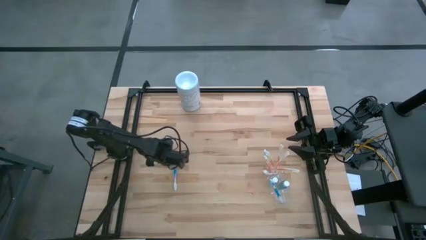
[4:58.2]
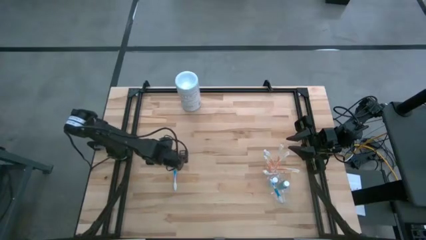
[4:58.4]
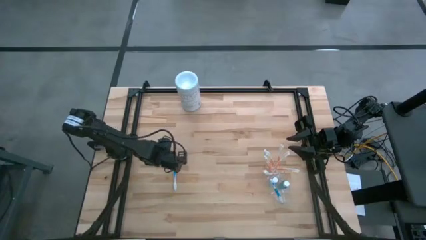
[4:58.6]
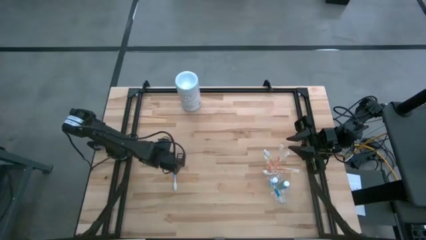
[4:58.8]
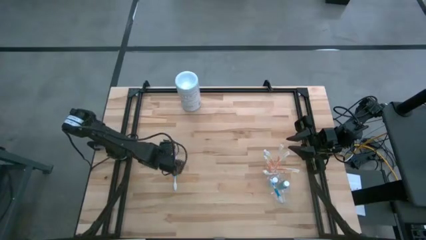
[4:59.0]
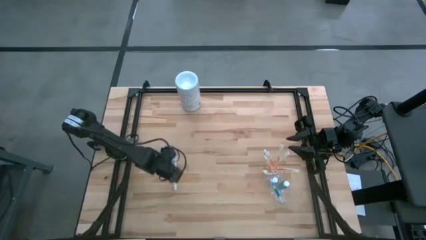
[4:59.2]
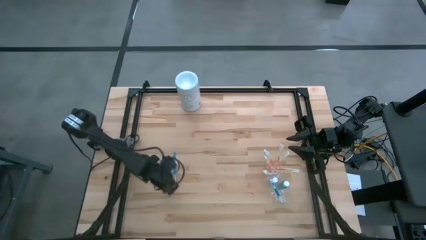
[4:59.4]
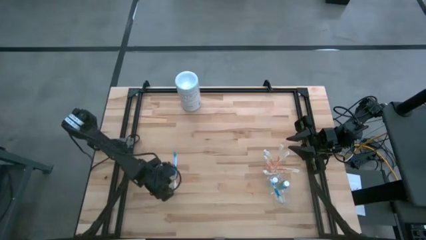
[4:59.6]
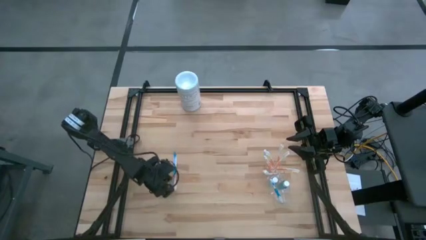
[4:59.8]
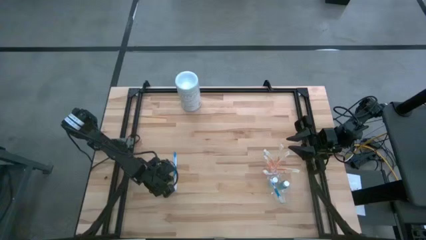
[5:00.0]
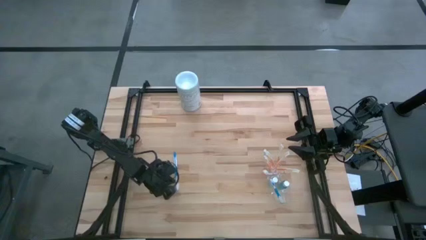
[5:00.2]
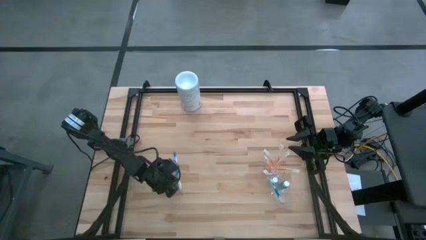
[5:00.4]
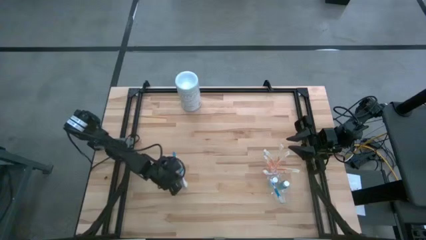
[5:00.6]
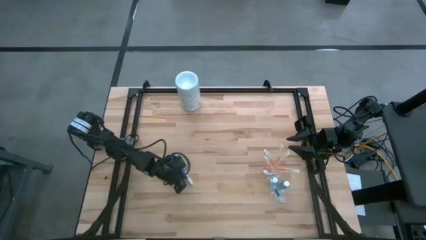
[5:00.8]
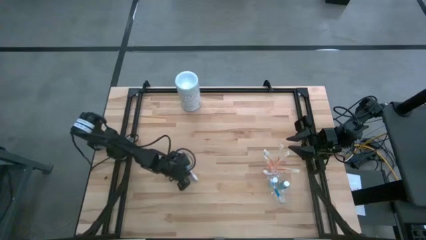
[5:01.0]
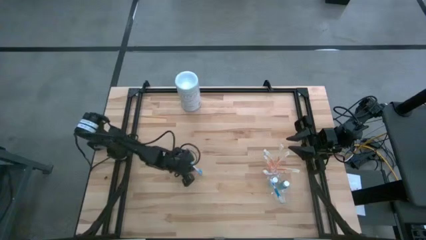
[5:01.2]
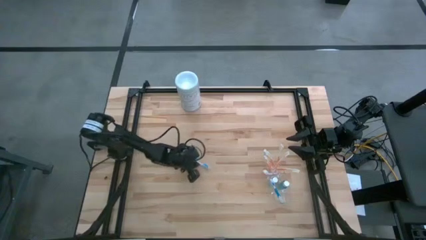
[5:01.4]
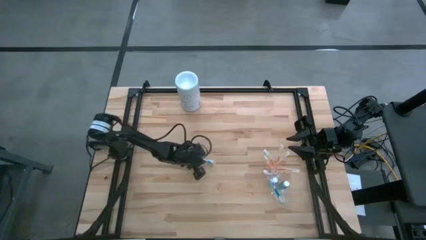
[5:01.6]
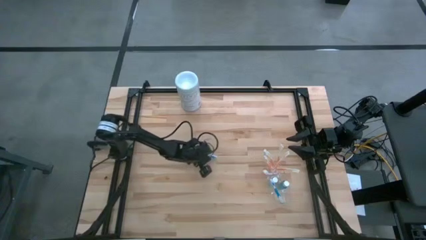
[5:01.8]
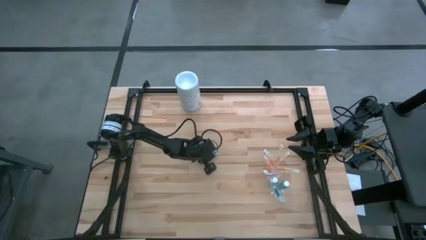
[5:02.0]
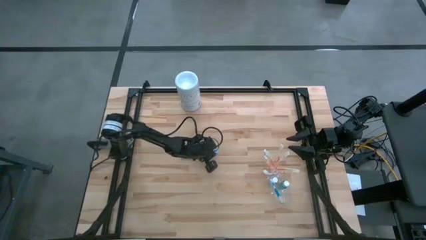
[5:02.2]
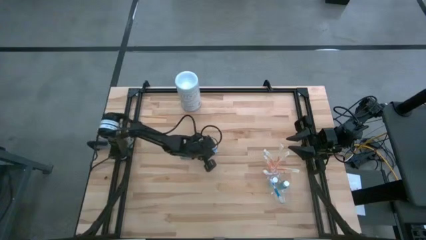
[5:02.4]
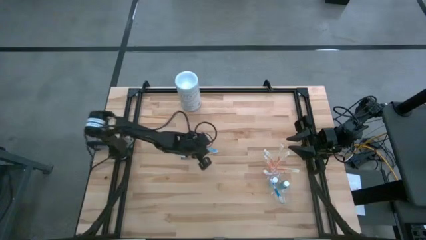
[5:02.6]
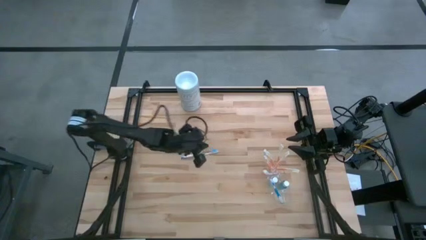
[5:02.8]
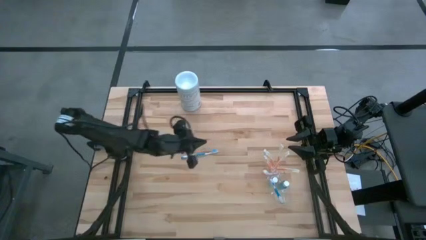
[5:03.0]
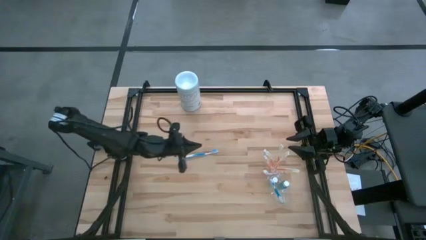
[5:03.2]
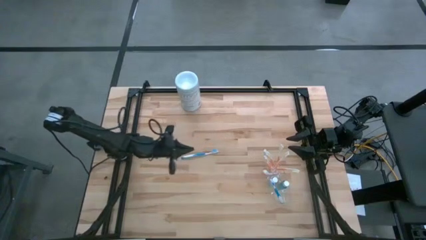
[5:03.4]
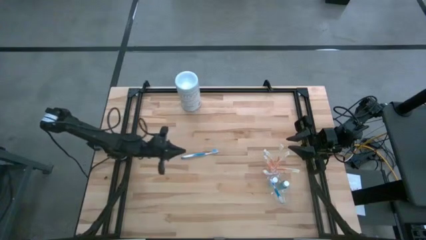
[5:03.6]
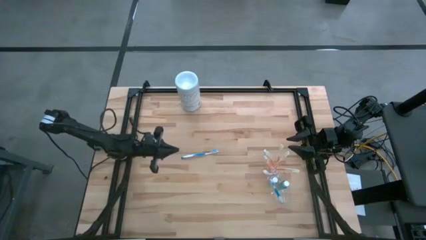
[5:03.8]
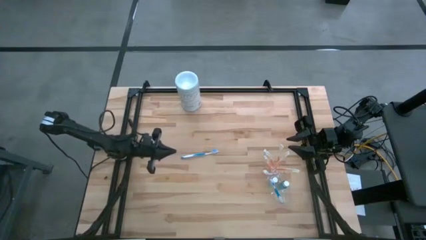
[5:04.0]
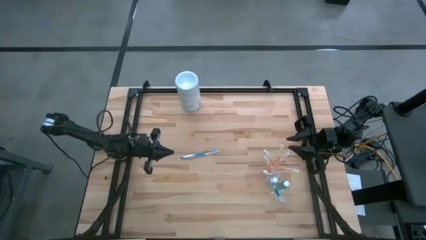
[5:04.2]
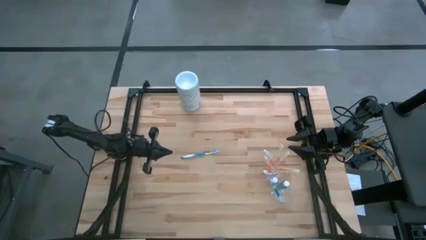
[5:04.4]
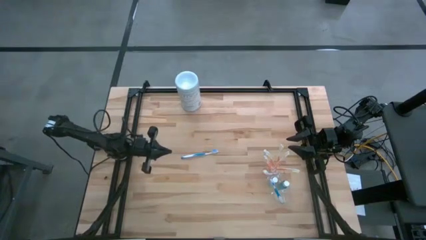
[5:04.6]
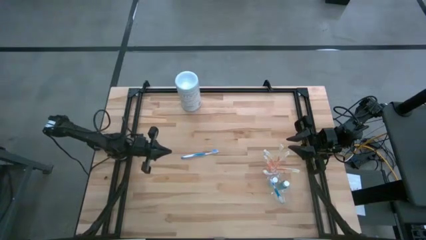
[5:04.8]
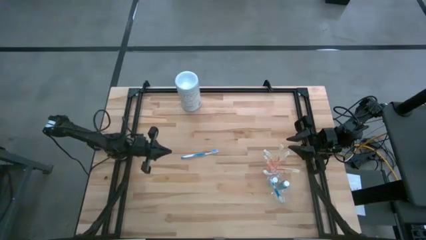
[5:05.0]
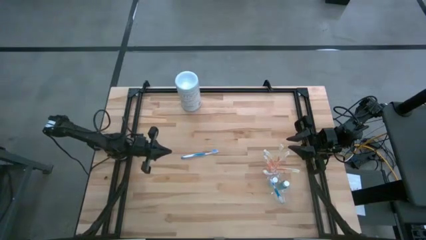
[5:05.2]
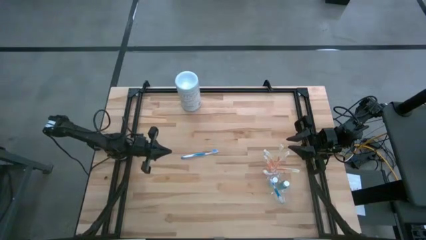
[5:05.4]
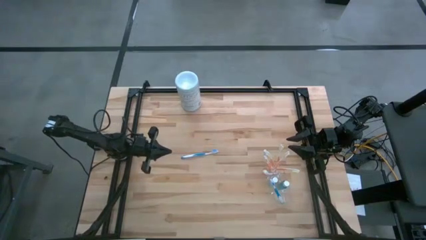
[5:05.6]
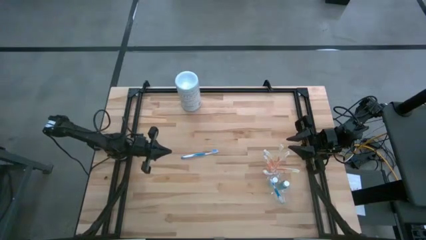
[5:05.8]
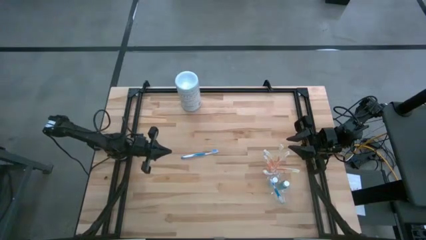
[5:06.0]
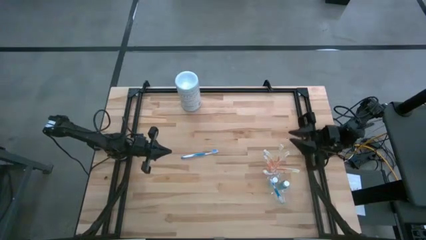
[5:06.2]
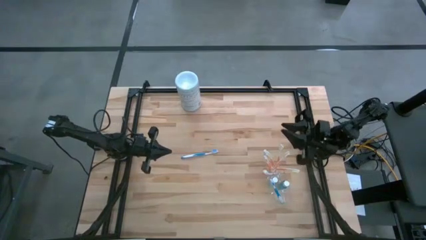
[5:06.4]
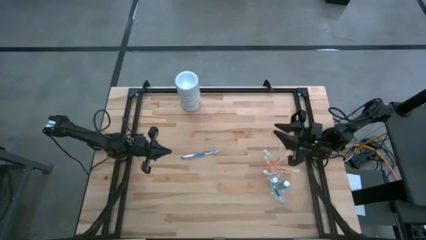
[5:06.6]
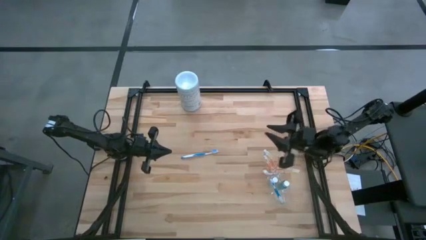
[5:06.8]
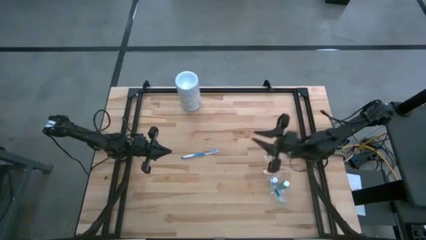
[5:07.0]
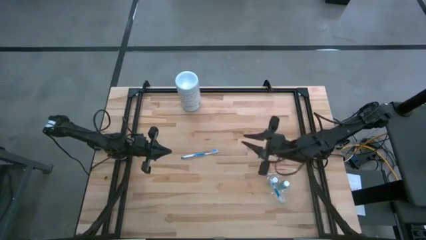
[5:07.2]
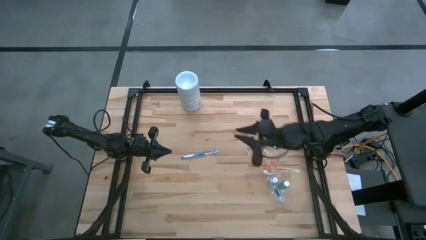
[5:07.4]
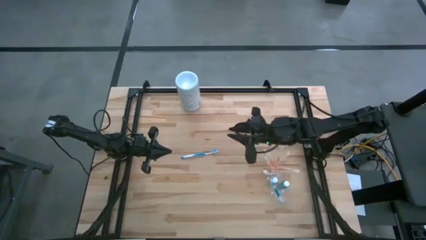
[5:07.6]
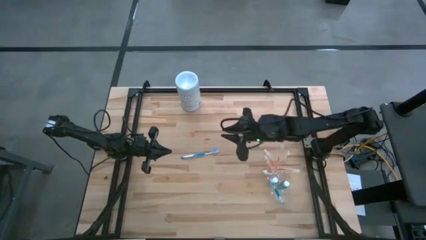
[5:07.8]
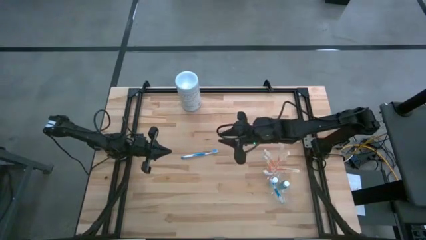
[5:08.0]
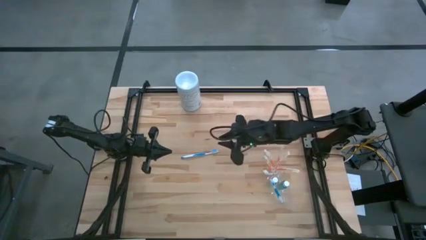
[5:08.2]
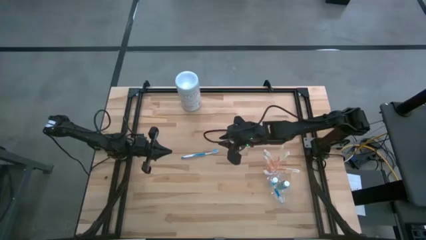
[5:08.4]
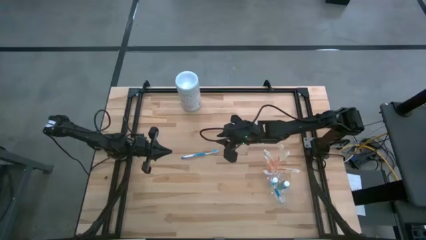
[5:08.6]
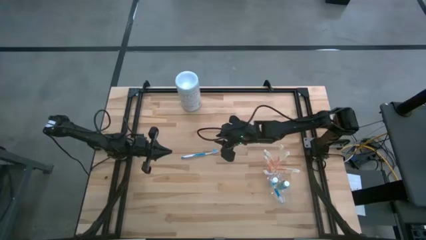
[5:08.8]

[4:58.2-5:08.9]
Task: Pick & Place toothbrushing station
Put the blue toothbrush into the bottom section of the transparent organizer

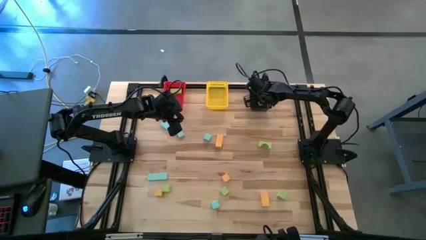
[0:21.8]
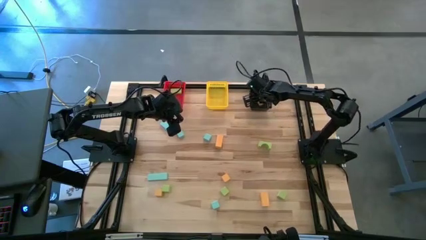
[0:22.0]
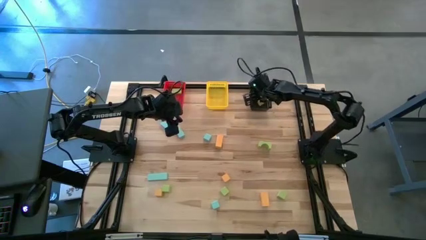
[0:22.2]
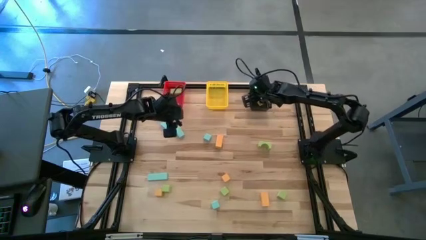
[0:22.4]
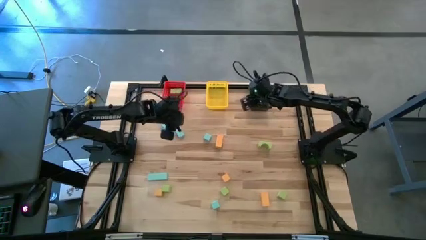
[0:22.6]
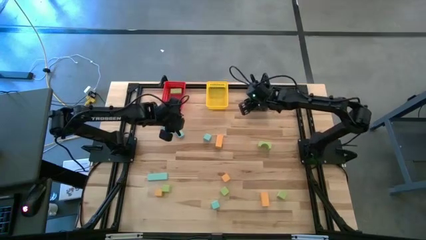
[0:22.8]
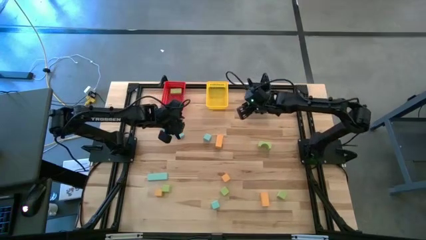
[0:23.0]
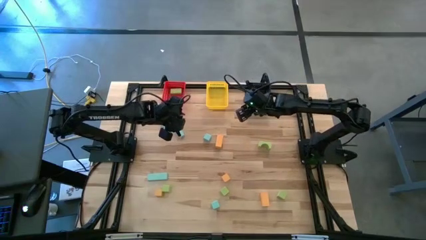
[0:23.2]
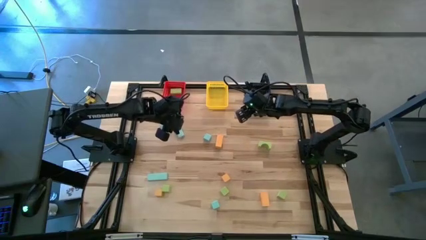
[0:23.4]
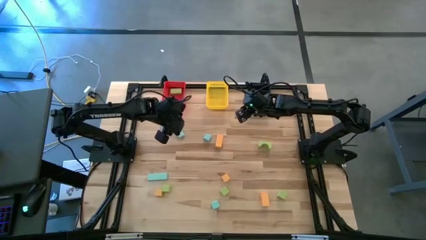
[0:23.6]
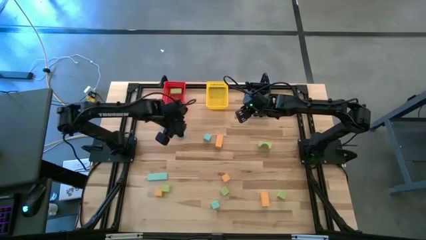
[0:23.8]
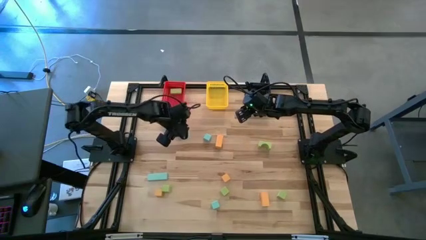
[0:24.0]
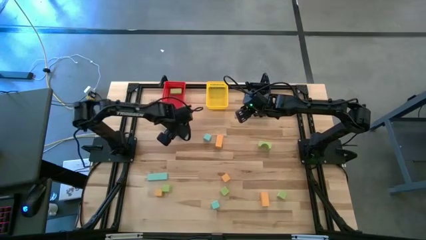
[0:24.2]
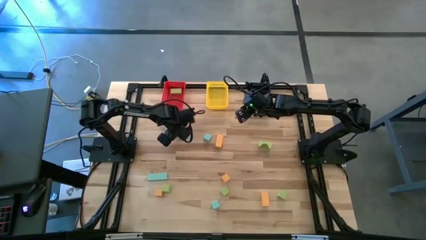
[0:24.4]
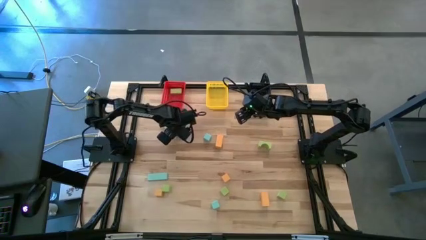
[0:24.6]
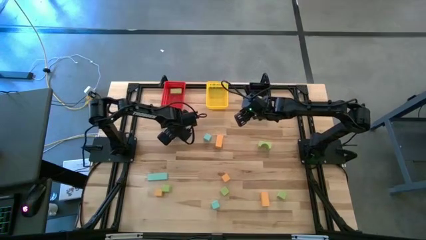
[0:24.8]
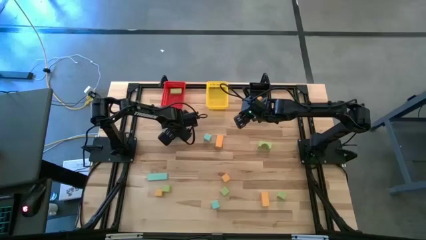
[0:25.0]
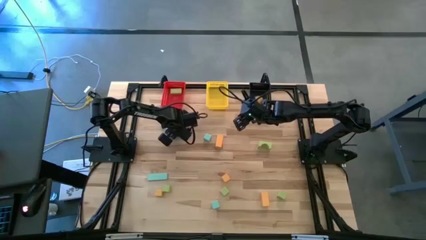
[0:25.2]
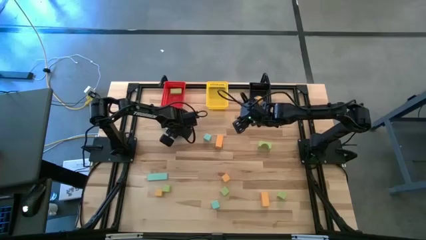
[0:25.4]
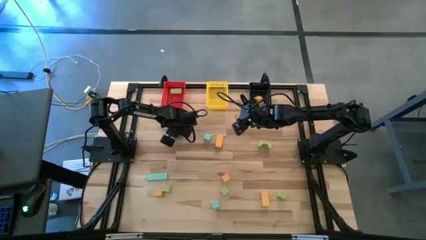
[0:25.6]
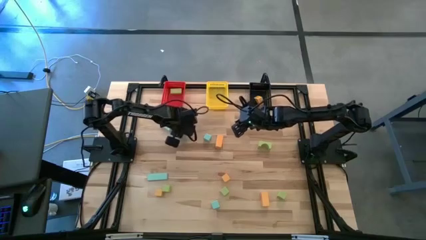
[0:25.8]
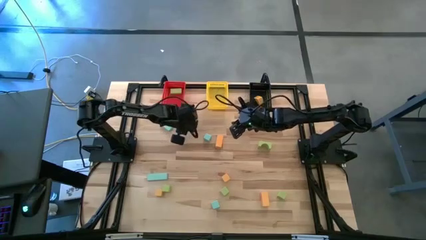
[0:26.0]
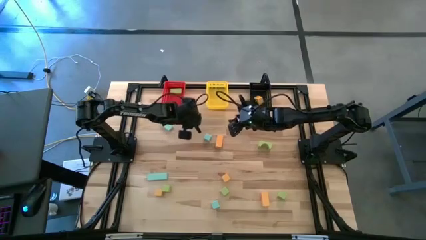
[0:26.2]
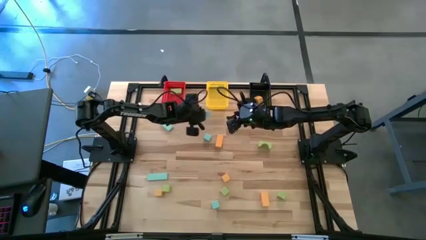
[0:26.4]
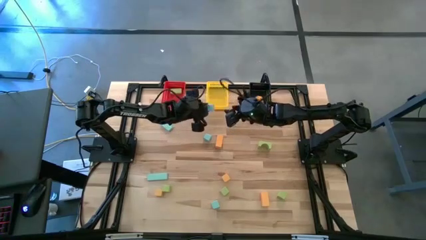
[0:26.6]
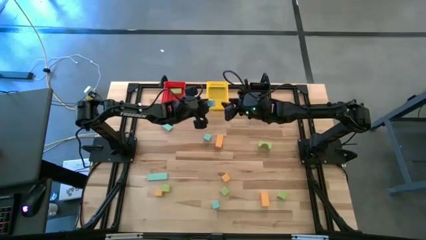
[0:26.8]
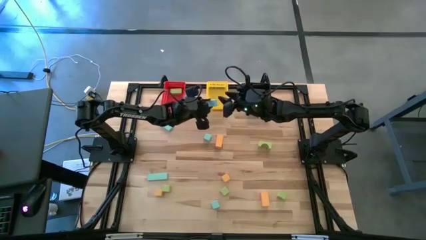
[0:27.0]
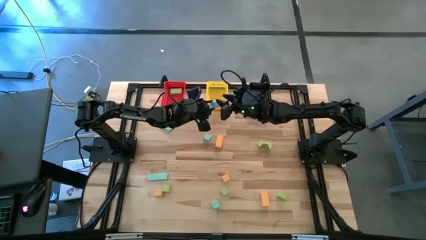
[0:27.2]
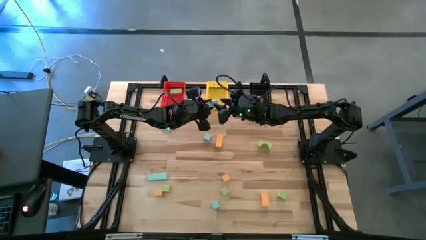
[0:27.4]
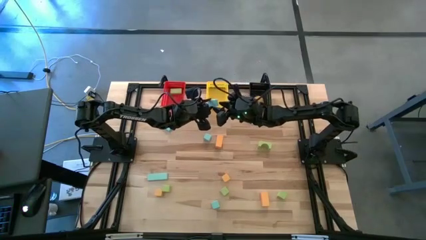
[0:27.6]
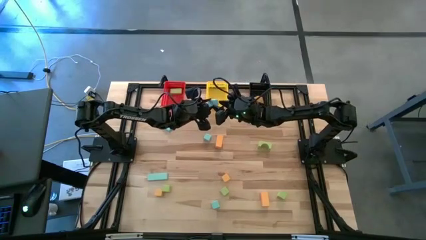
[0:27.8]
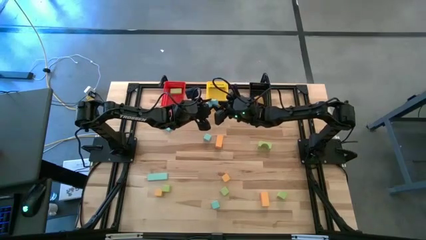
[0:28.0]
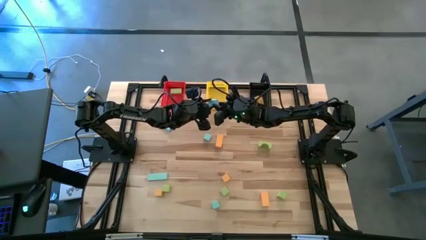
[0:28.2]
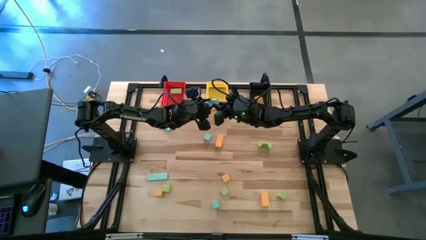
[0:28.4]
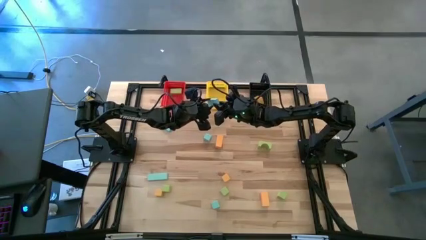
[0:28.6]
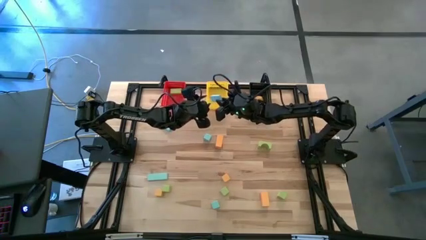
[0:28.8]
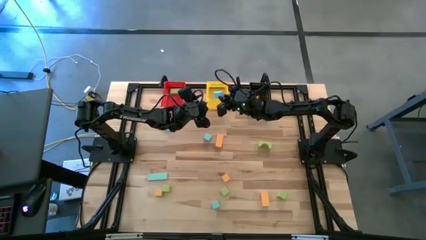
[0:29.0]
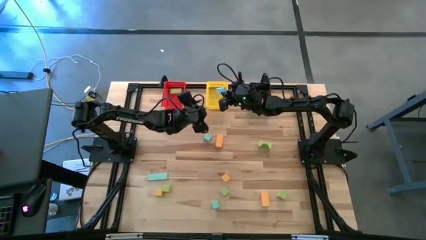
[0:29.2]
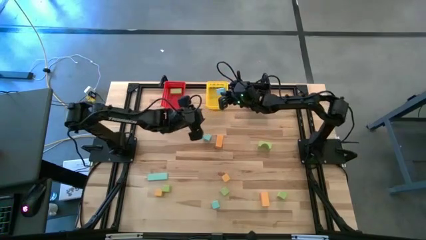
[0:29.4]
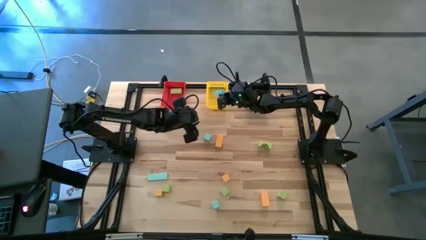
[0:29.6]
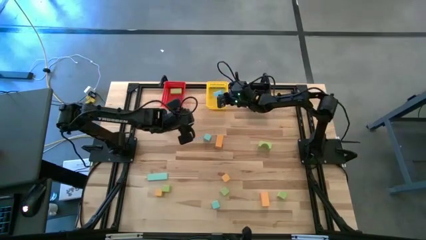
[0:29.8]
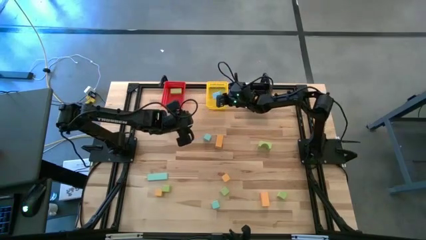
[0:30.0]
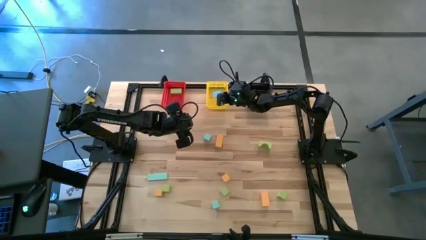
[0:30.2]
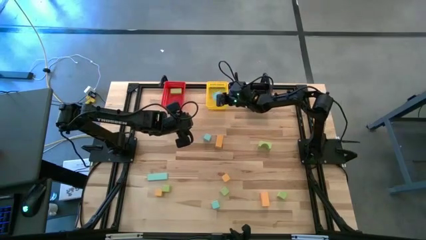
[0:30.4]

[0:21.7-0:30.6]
Task: Sort & place blocks by color
Put the blue block into the yellow bin
